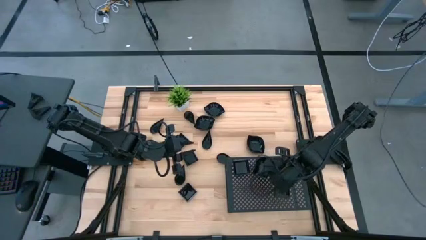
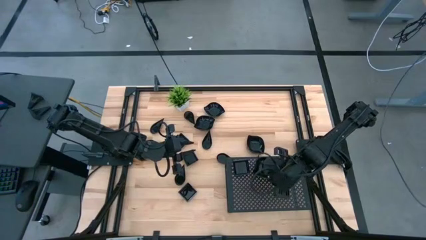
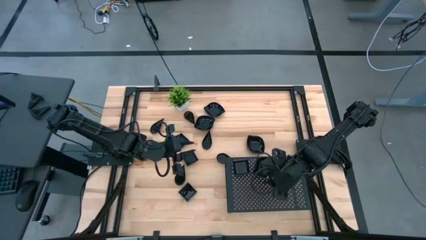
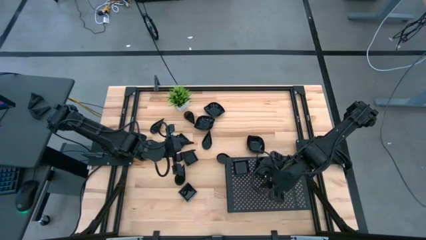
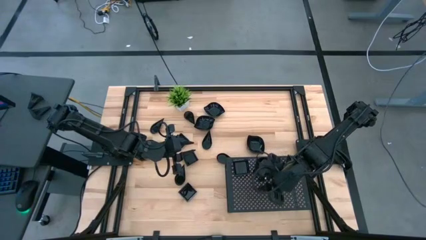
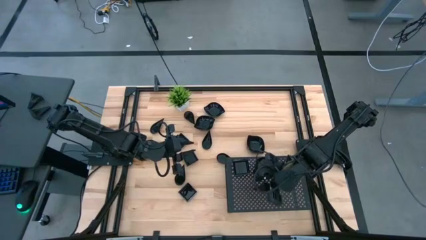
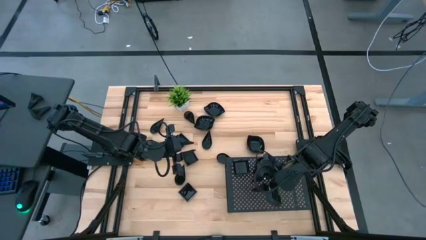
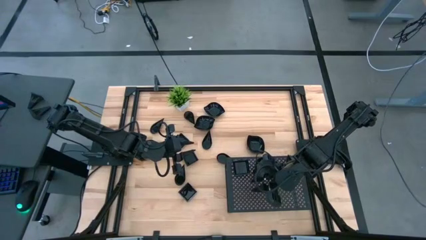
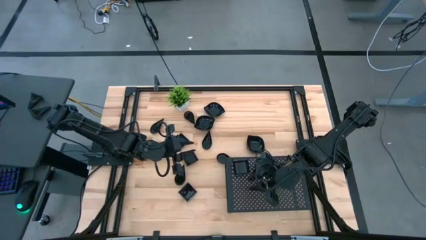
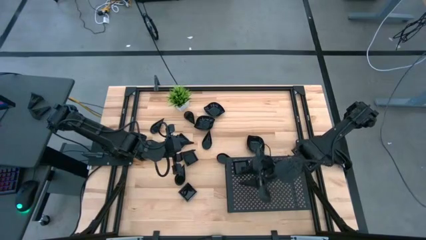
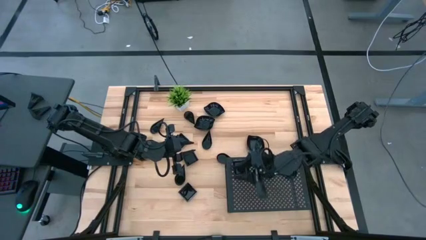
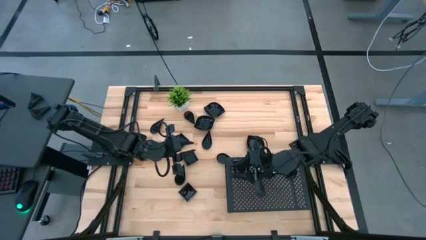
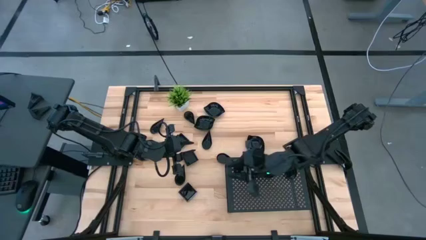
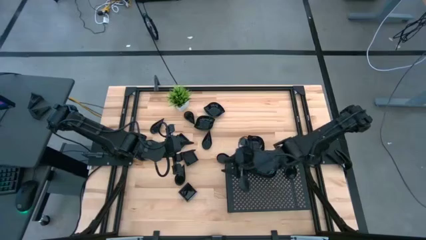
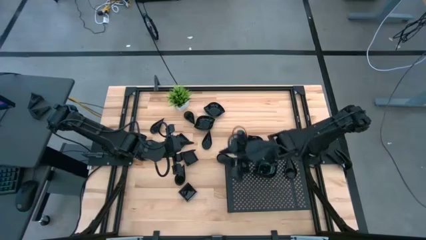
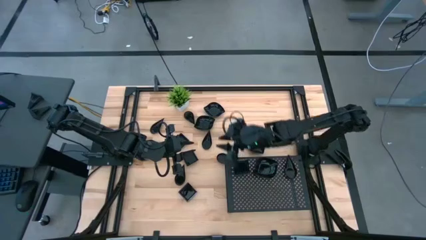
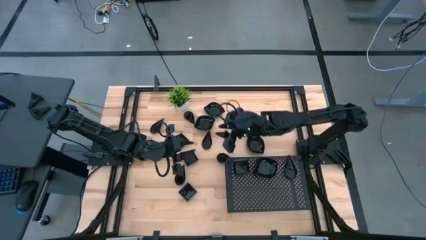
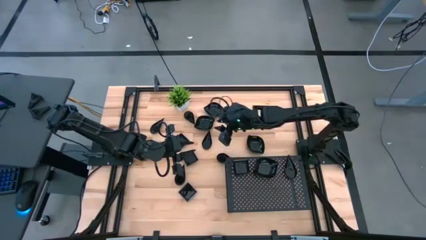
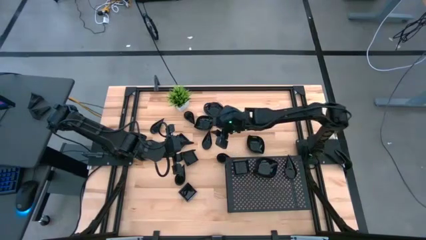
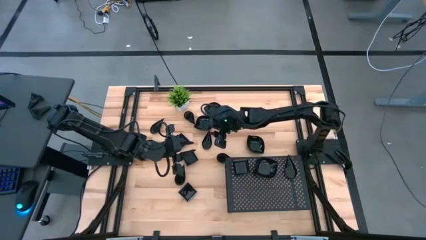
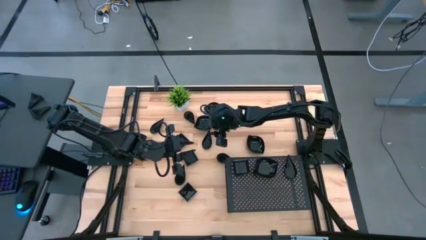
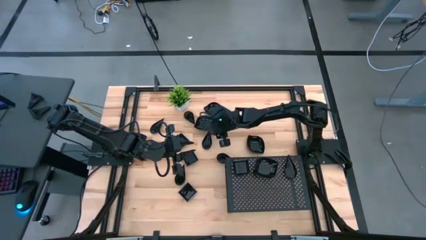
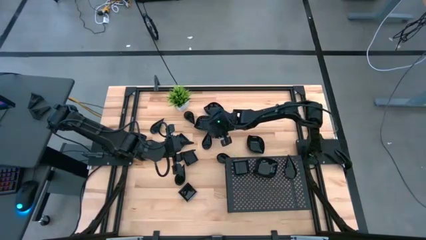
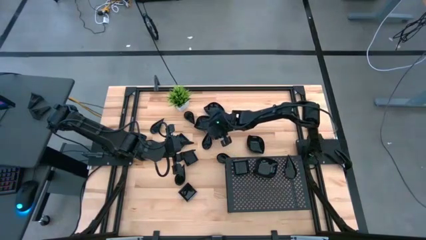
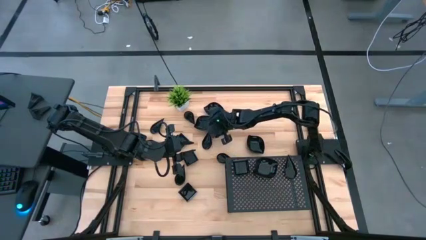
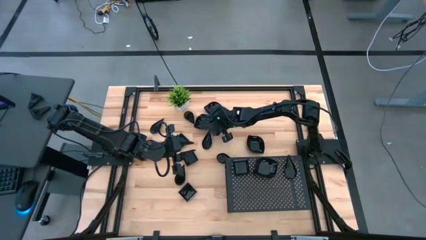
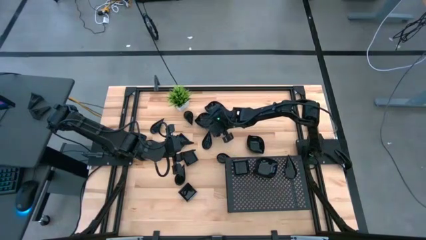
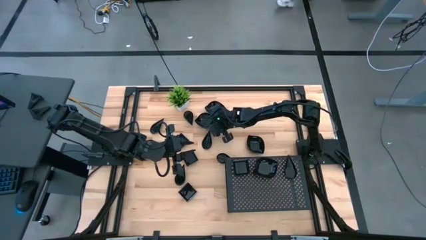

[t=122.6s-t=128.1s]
Task: Pick & Place Mini shaped plates
Stack the leaf shaped plate on top of the leaf shaped plate on the shelf

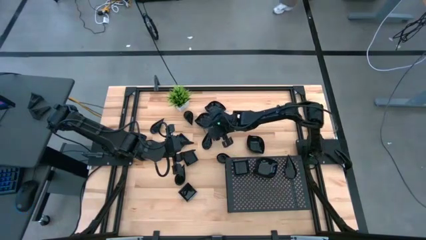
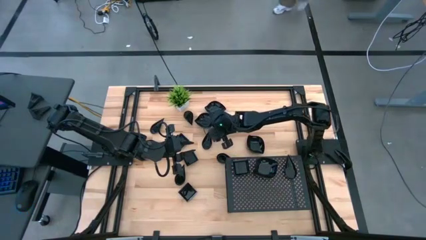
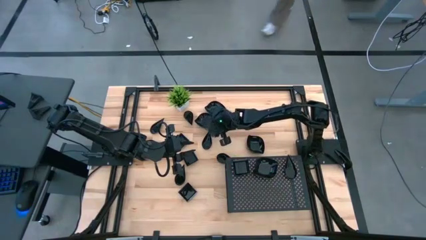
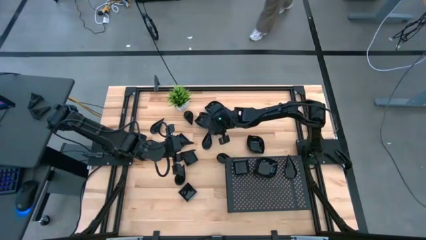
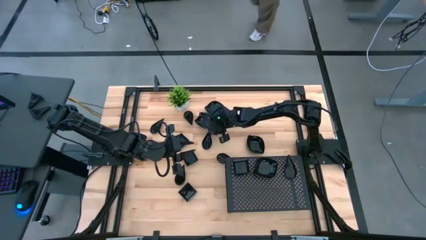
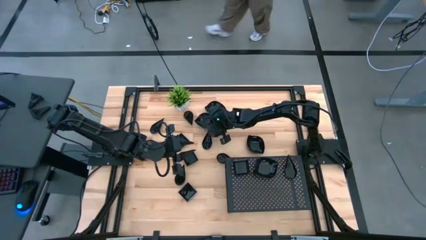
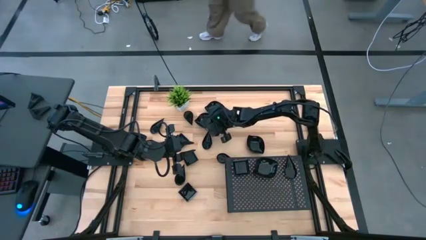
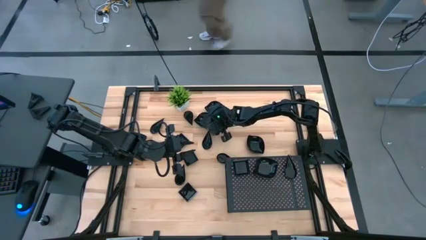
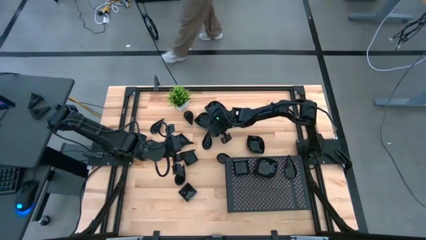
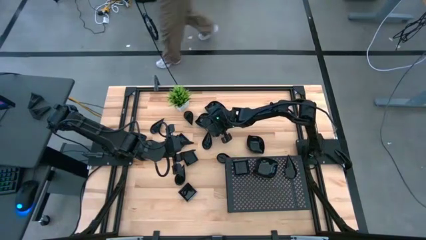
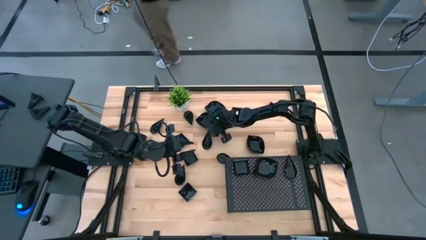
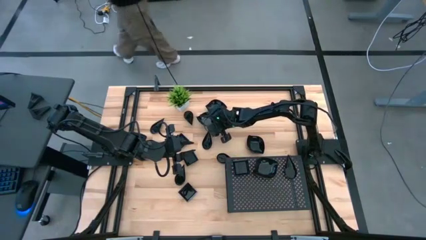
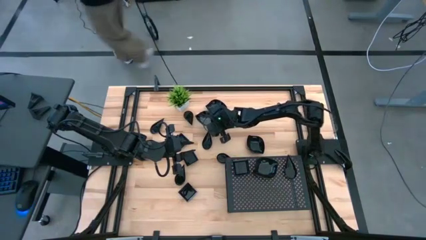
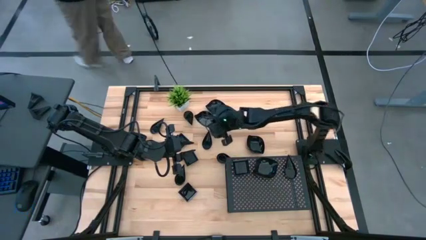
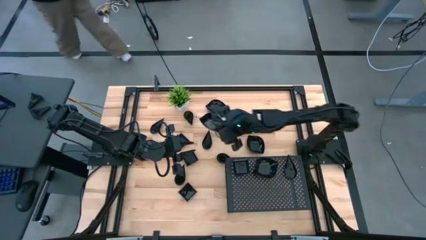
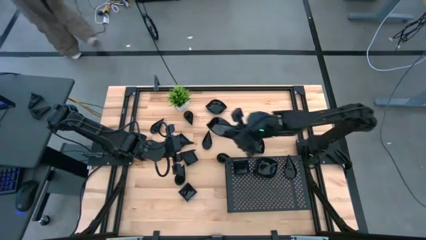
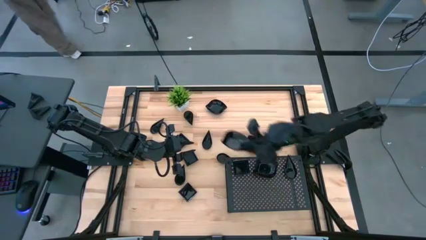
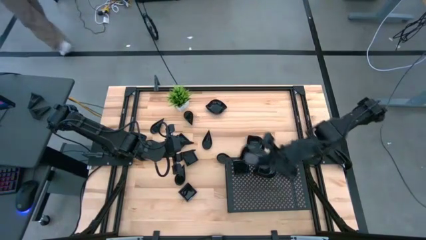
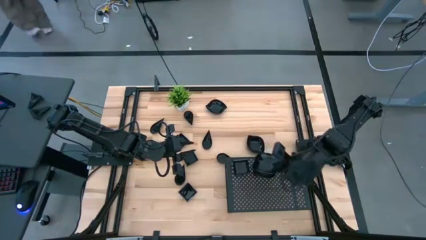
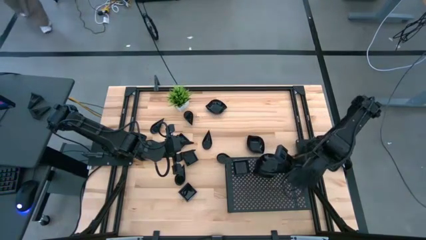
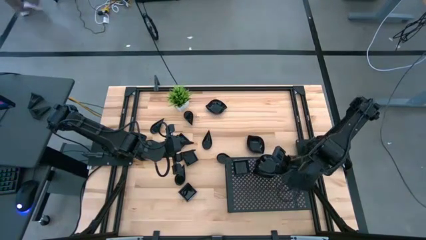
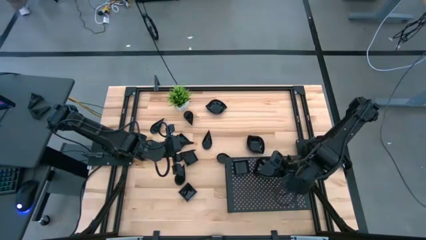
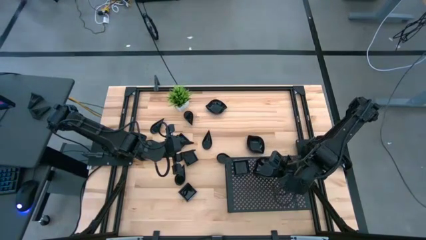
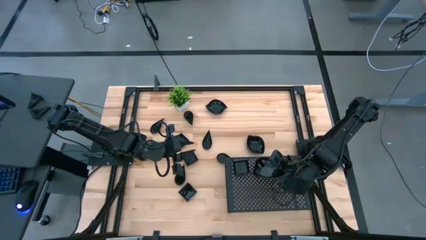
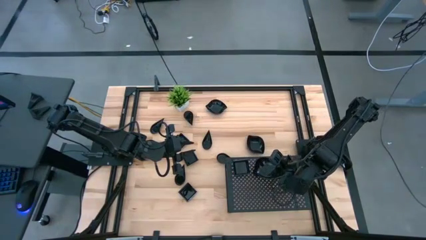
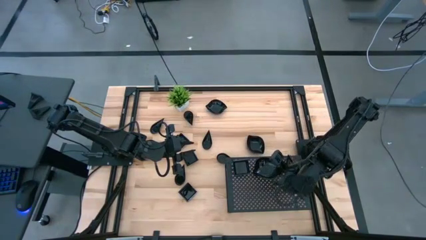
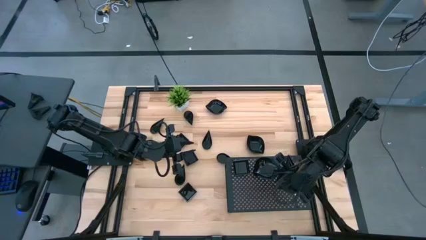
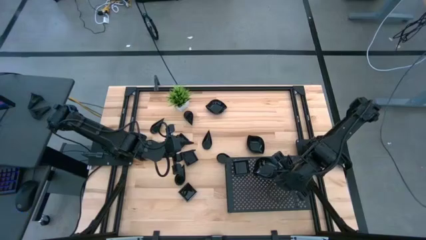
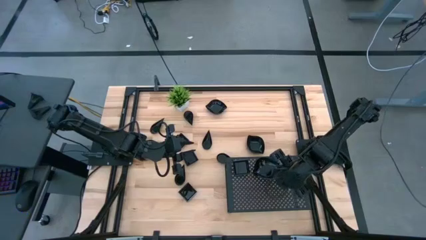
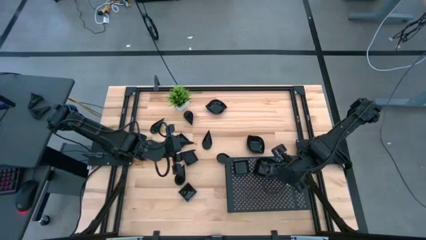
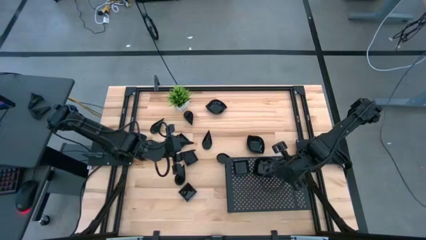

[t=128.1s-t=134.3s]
Stack the leaf shaped plate on top of the leaf shaped plate on the shelf

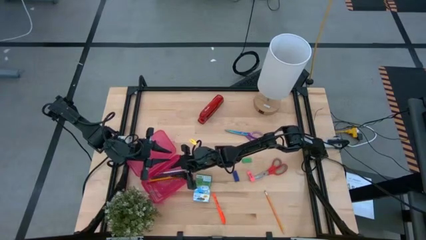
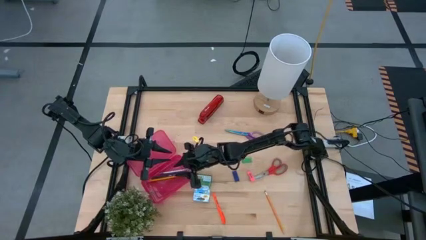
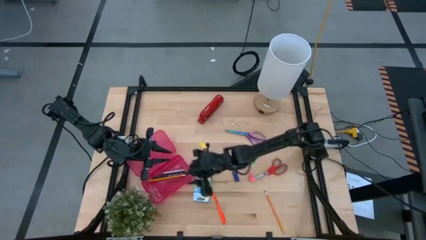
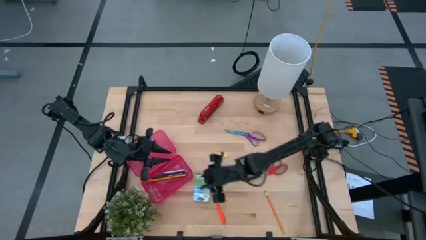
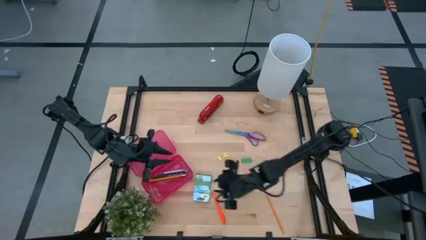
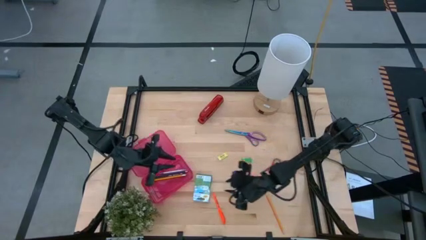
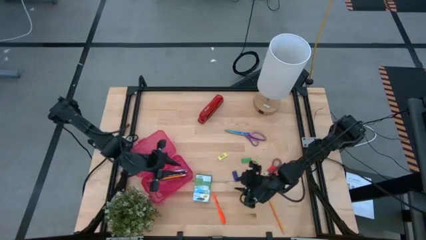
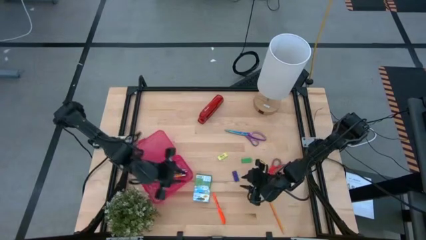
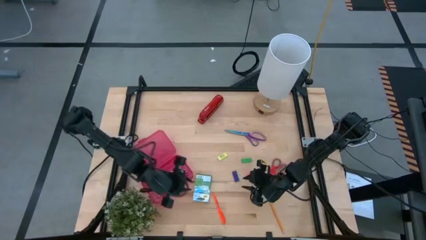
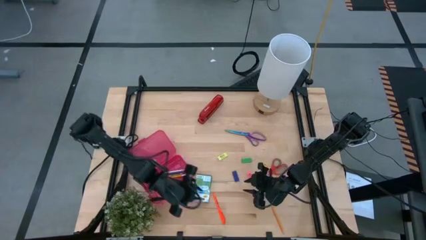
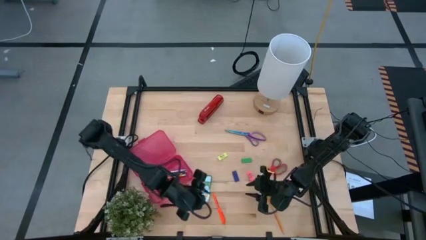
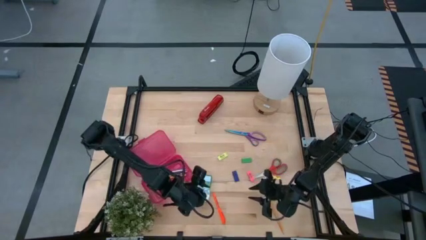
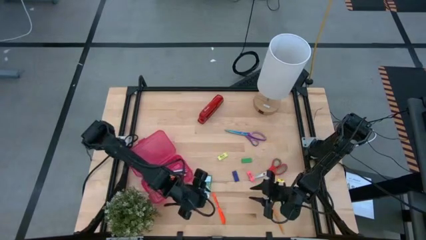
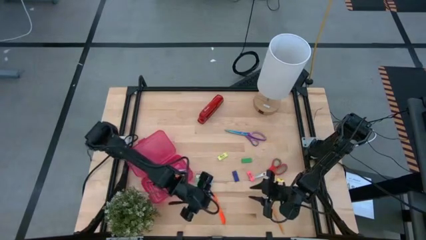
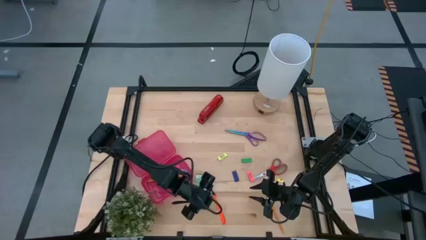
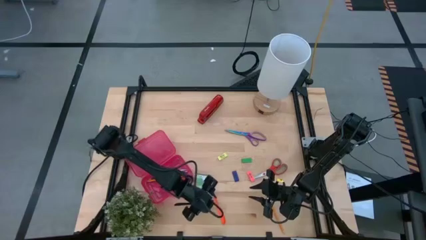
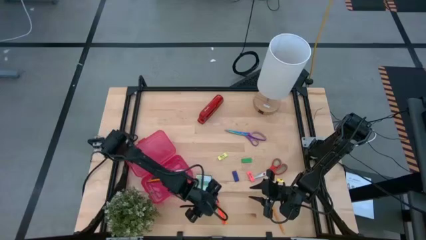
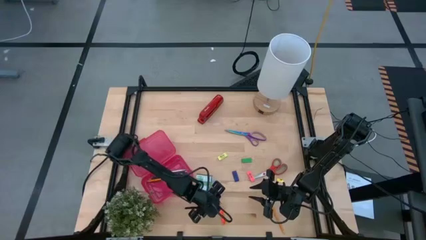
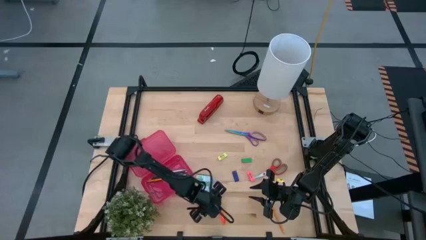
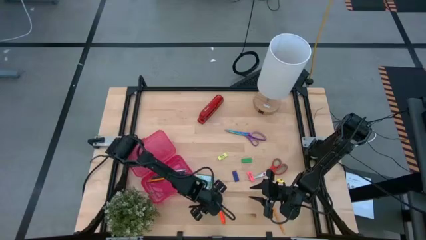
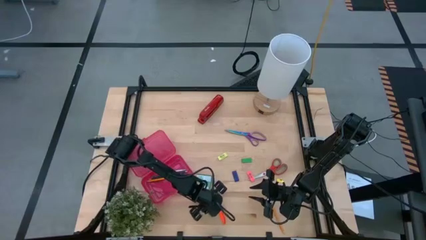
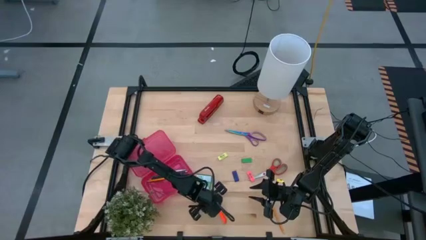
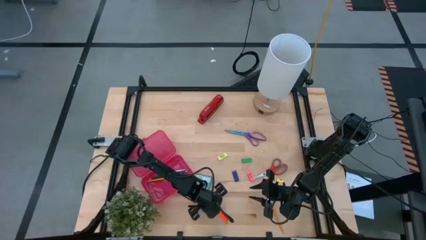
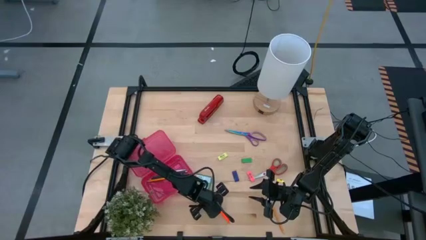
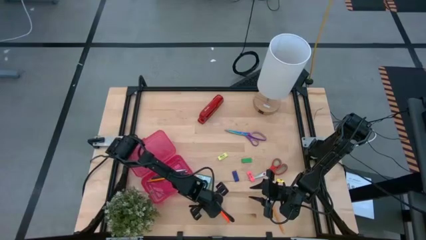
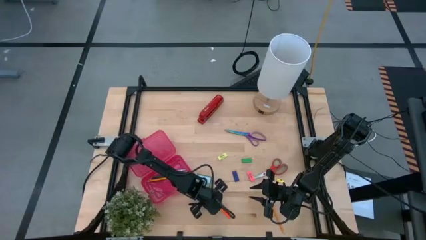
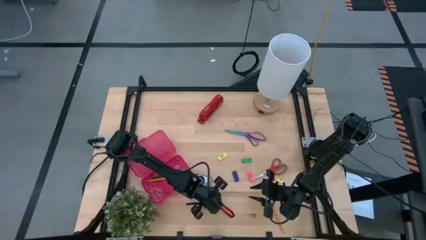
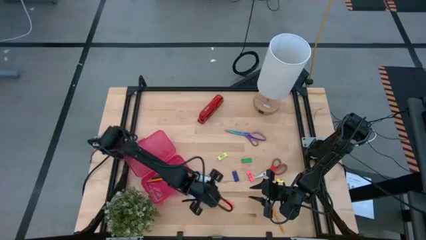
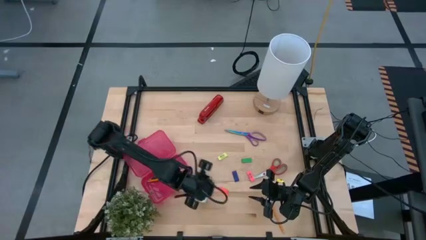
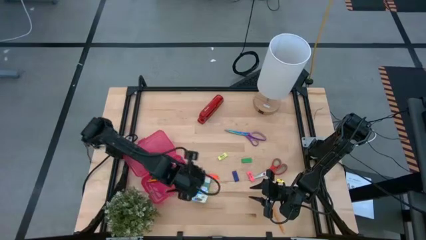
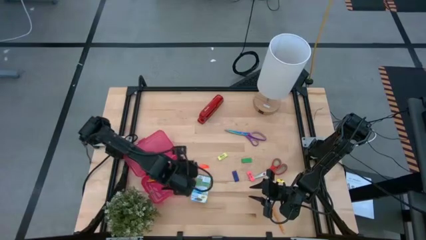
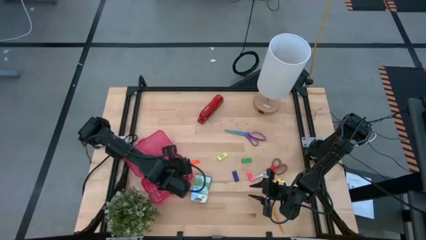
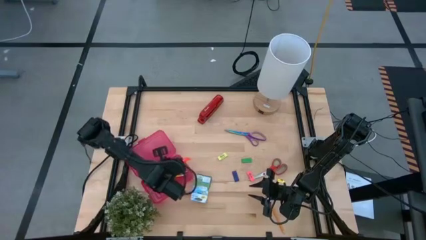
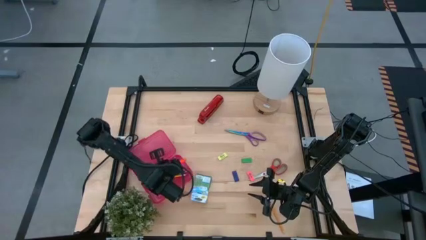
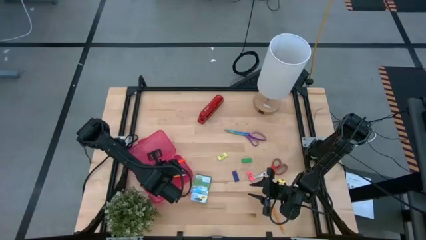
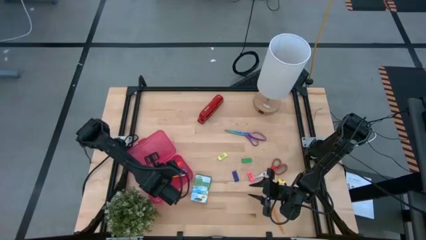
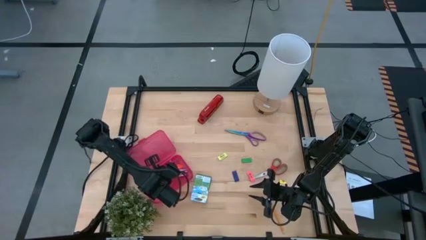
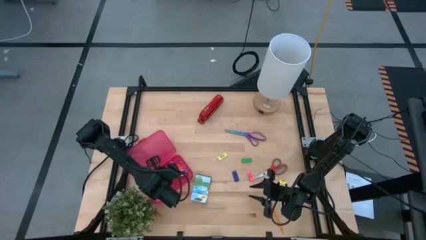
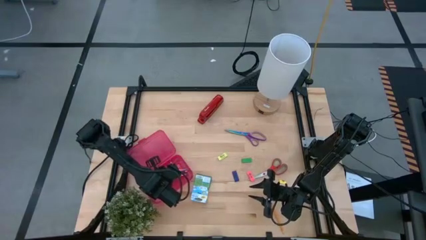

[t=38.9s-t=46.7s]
Task: Pack school essentials
Put the orange pen into the red supply box
